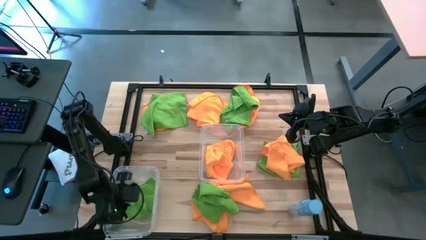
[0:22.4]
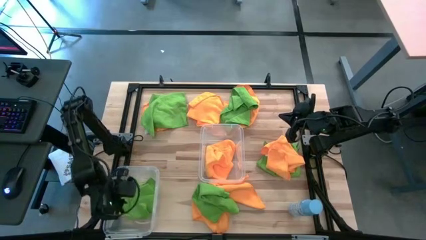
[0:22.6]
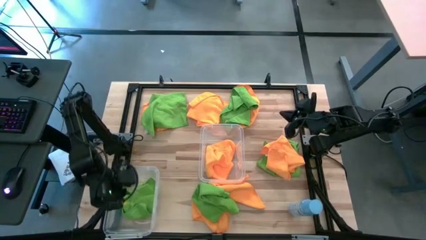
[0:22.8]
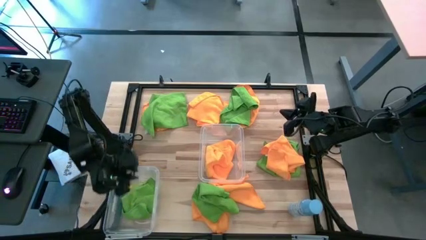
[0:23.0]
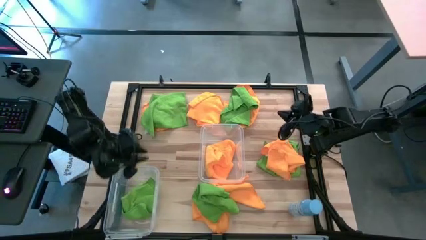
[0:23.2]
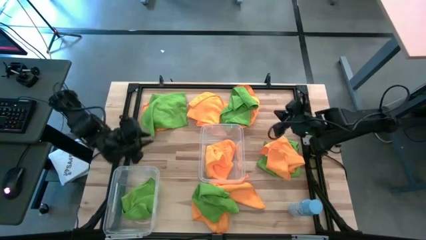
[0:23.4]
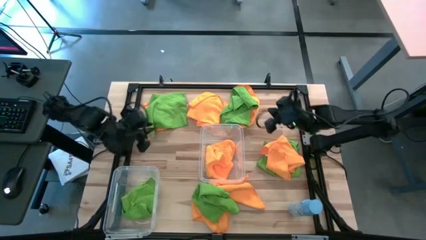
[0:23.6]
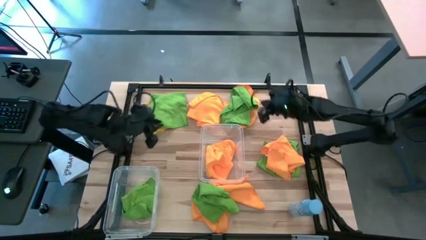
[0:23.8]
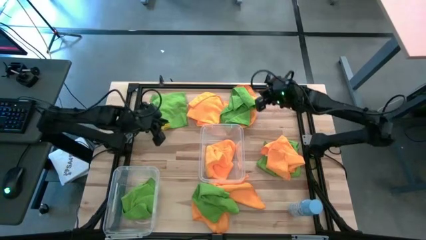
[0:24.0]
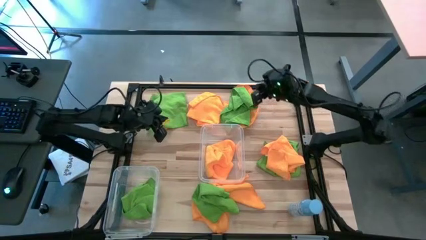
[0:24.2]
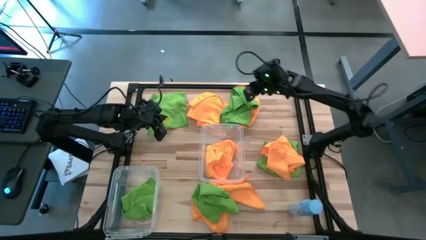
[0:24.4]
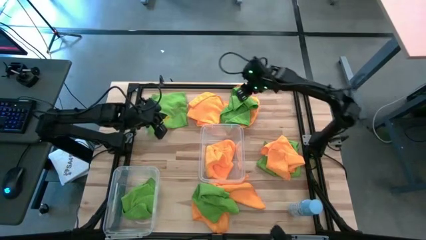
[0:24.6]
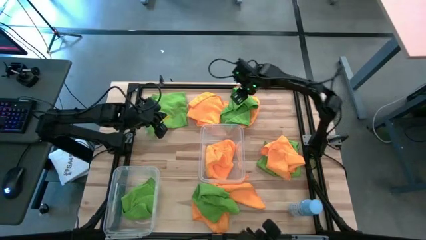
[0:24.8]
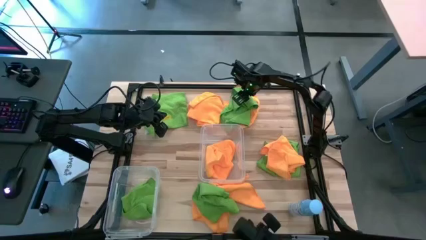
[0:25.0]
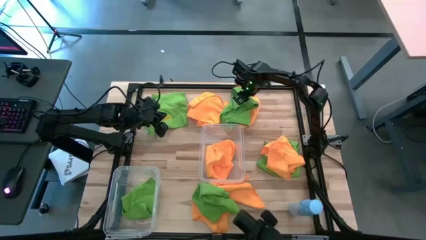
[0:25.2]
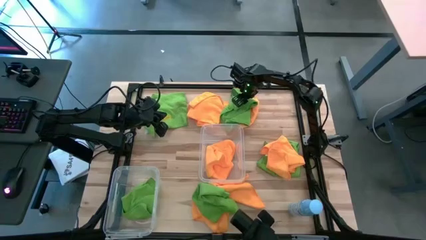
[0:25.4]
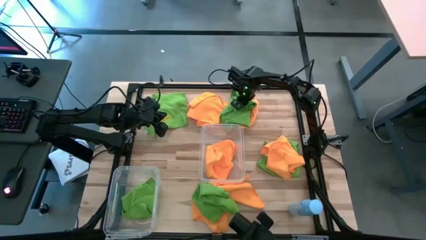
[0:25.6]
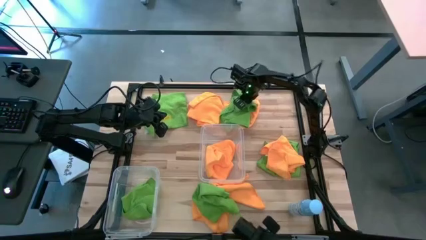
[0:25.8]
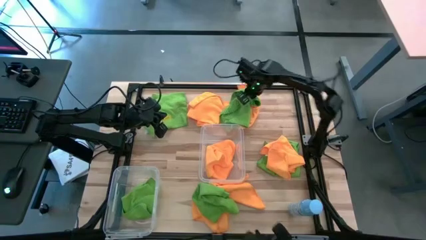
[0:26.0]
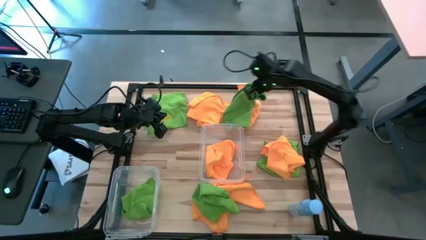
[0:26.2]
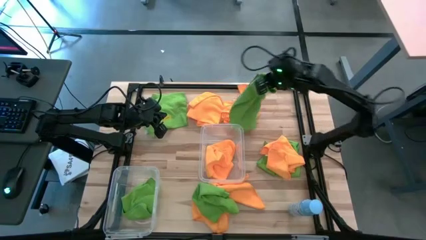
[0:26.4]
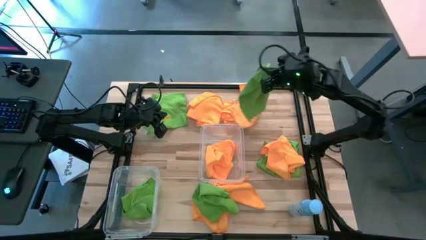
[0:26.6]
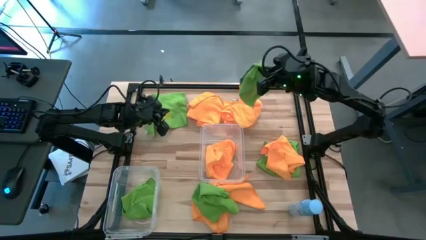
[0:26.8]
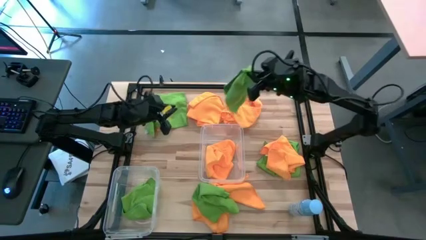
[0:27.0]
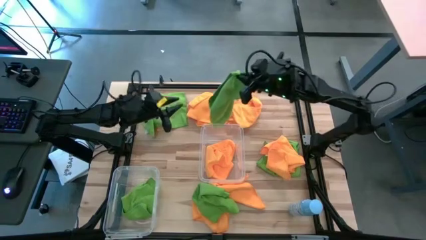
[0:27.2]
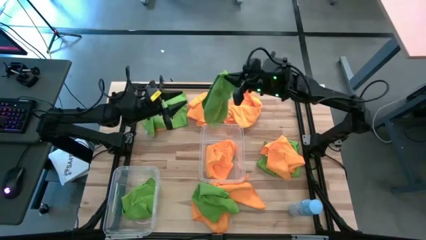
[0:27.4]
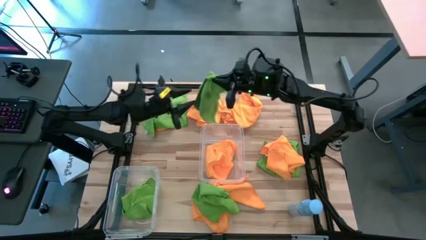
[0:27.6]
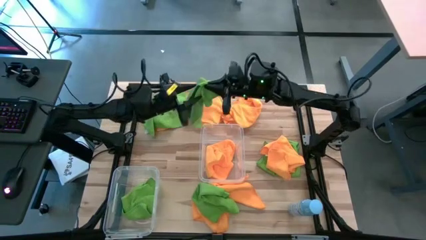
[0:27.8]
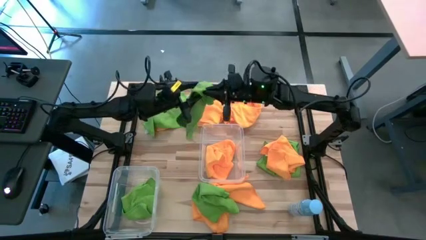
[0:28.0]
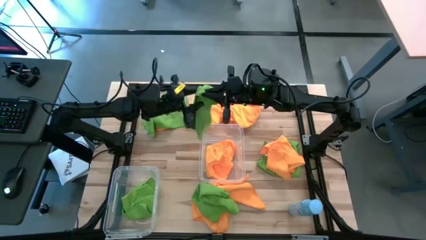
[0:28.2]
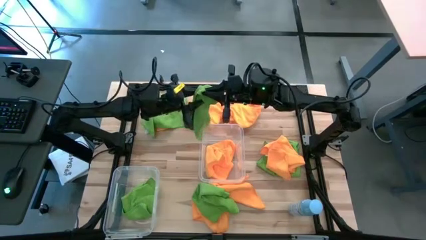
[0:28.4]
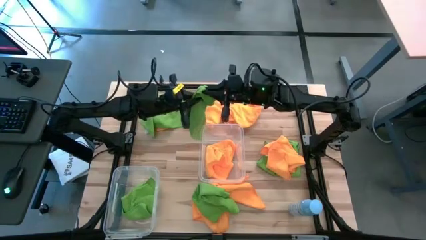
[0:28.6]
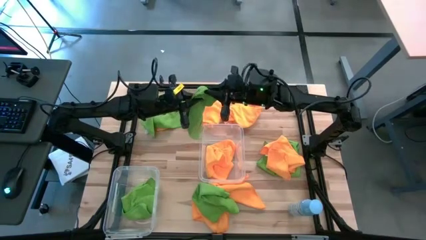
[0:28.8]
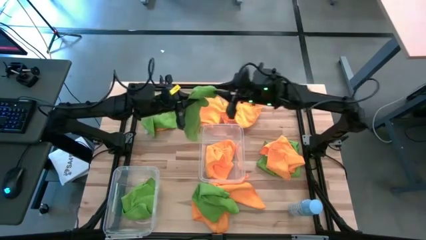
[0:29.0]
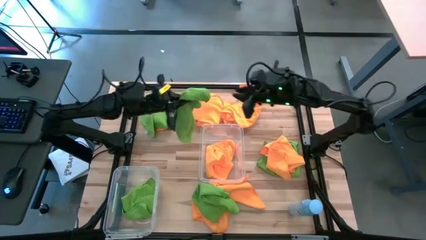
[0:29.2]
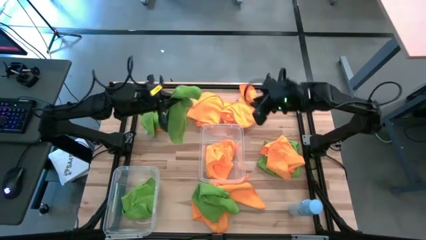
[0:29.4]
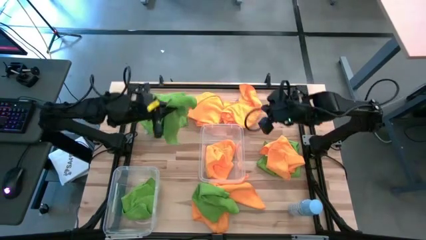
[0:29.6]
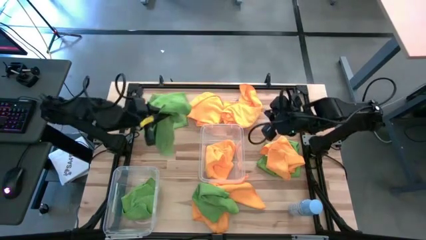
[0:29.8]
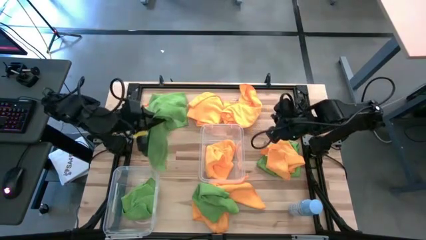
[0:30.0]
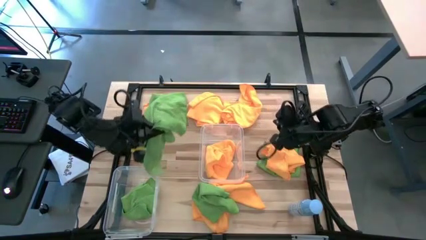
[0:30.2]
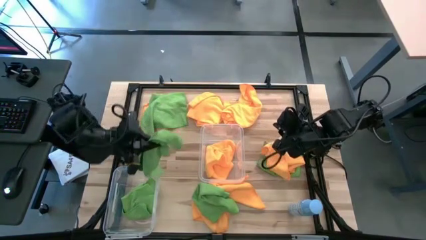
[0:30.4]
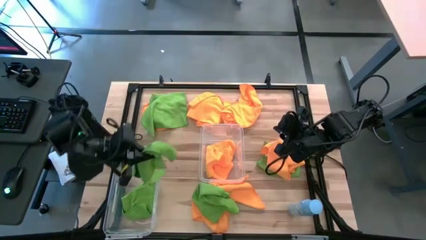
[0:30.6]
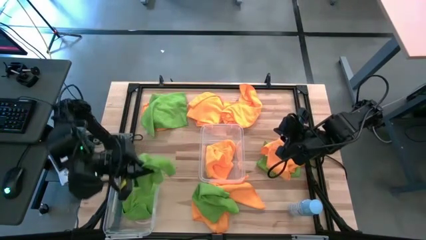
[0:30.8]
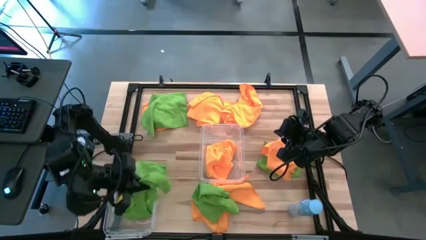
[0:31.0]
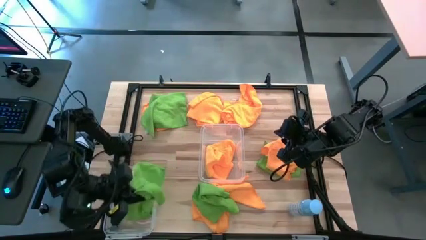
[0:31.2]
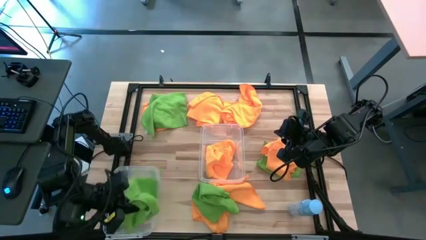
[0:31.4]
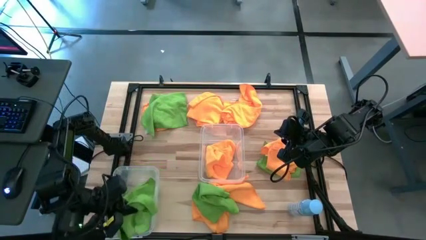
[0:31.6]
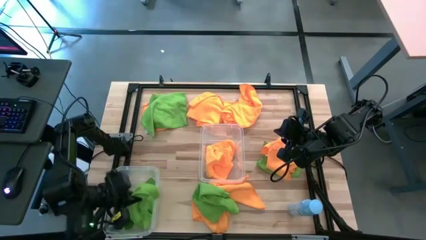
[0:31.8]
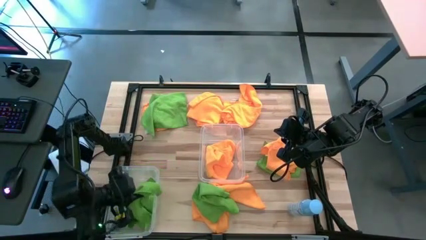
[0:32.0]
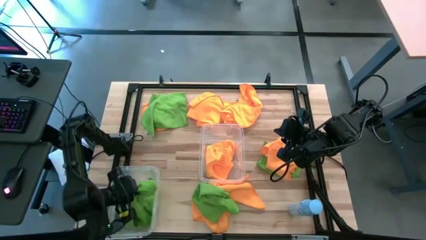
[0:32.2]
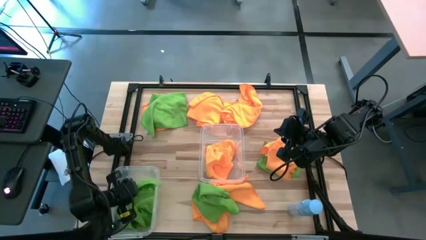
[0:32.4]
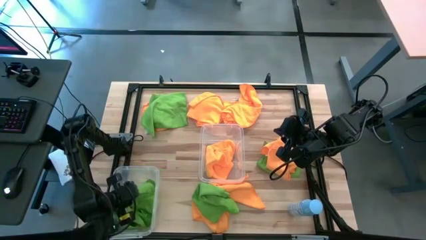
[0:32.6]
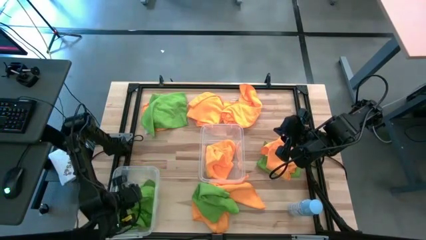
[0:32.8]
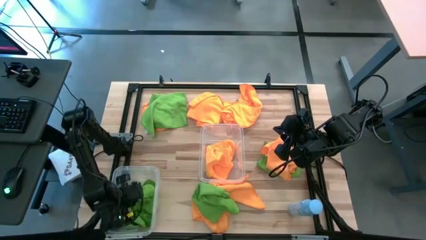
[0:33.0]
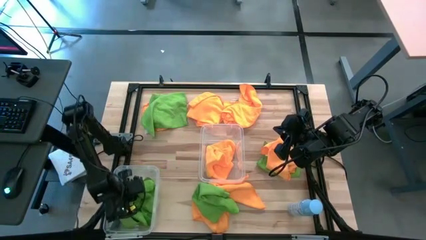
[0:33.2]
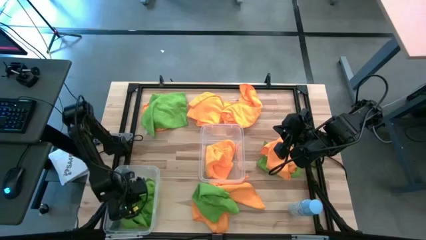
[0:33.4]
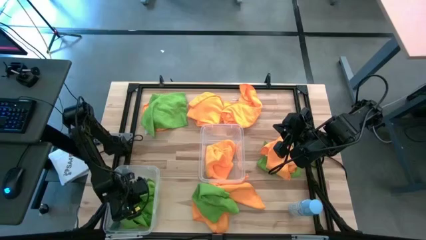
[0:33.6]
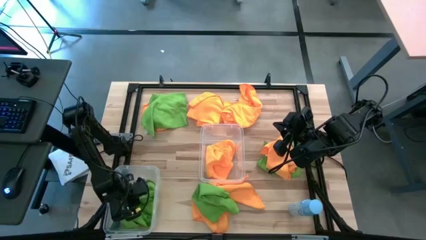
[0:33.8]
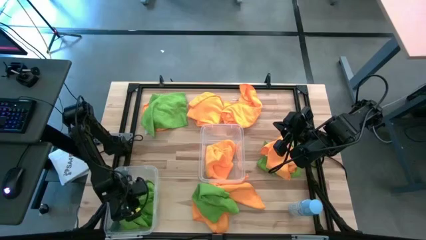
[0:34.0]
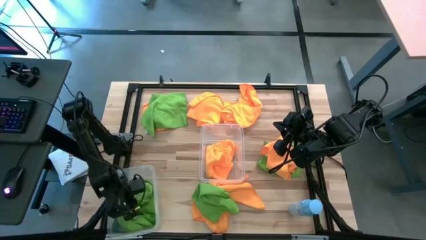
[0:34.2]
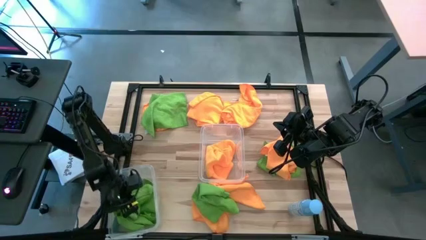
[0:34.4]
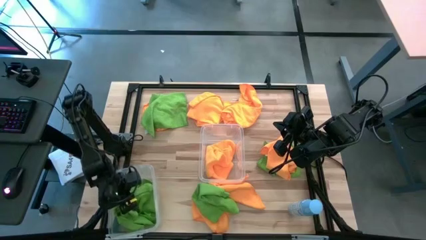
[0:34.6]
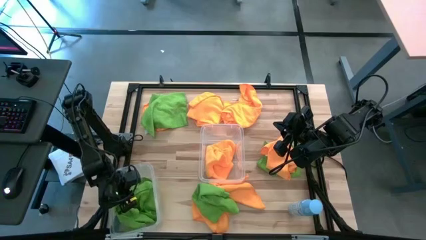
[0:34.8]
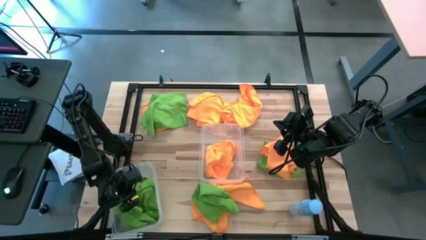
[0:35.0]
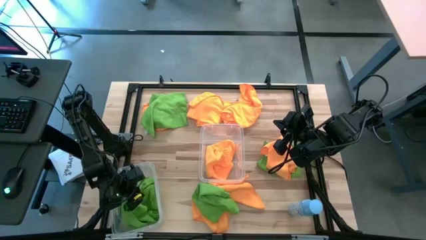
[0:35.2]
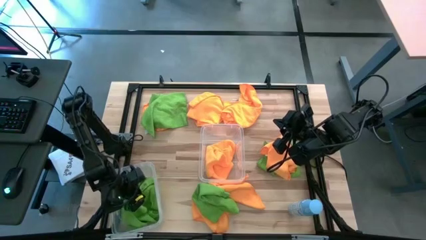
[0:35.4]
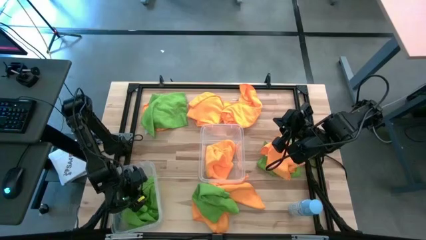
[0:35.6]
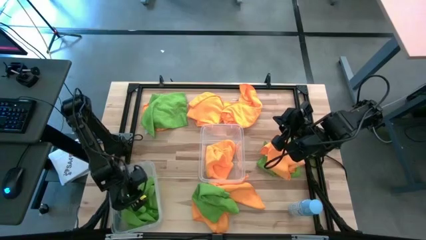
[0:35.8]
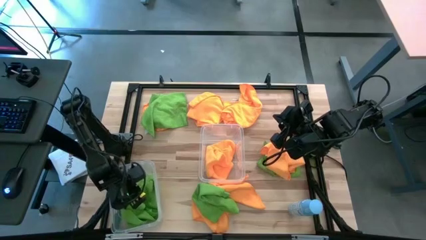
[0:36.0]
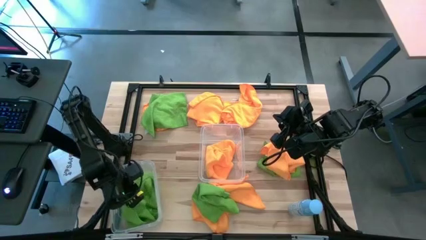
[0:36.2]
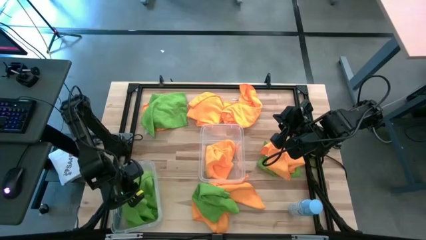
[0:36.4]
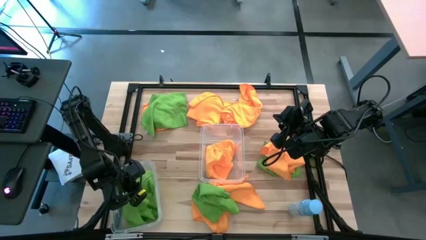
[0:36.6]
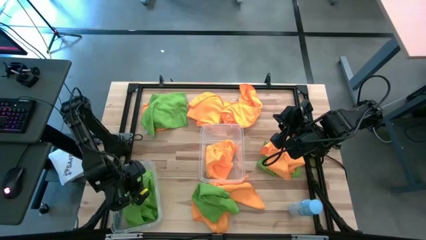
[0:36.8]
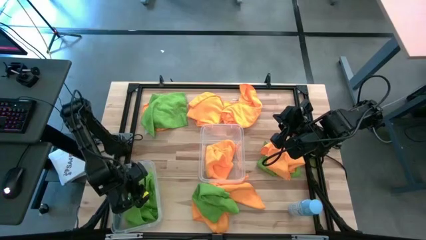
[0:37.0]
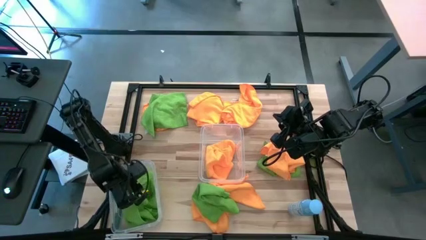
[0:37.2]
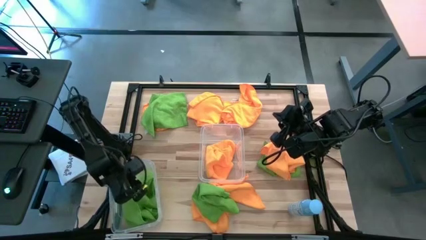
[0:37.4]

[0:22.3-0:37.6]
Task: Sort microfiber towel by color & place in baskets
Put the green microfiber towel into the left transparent bin
